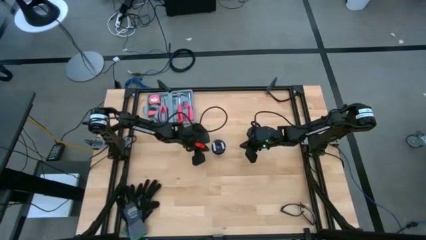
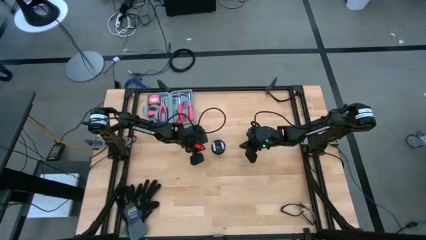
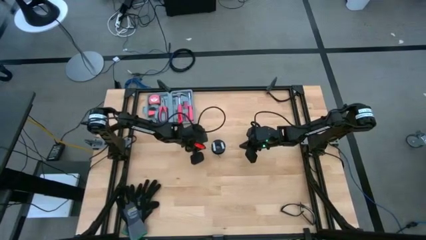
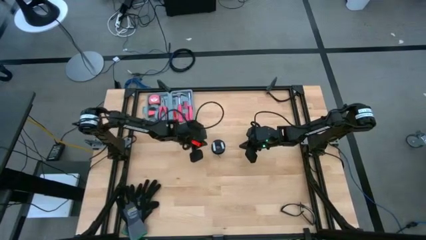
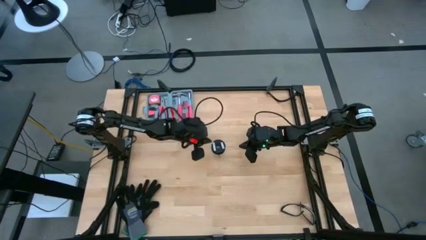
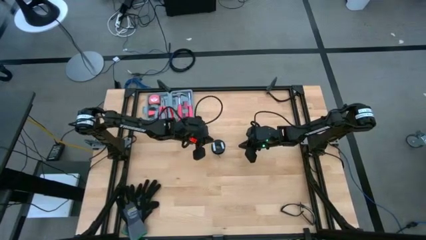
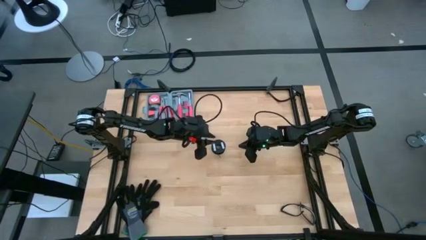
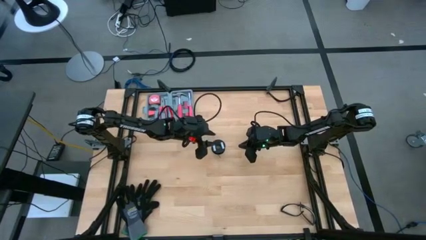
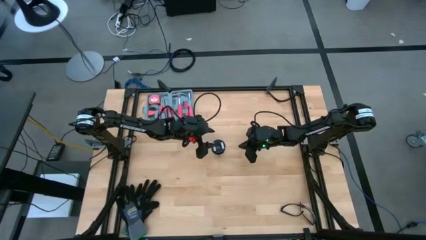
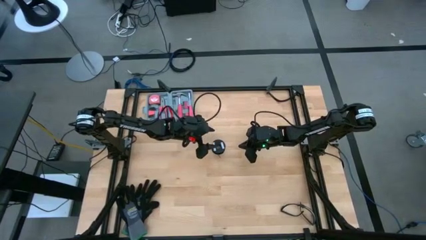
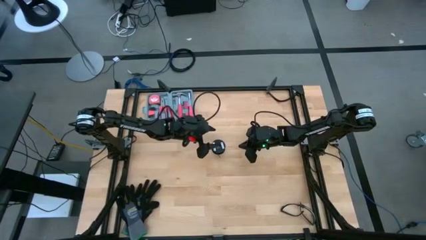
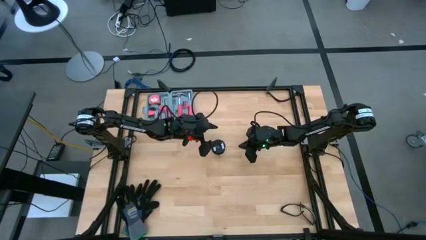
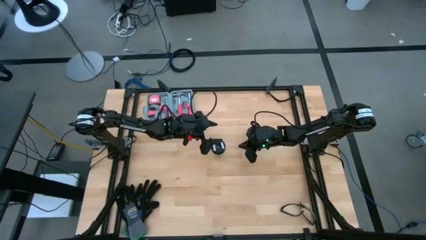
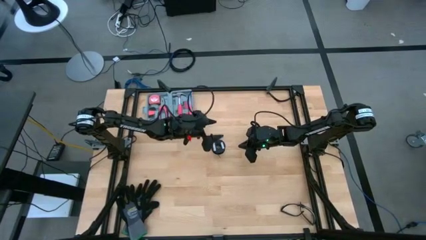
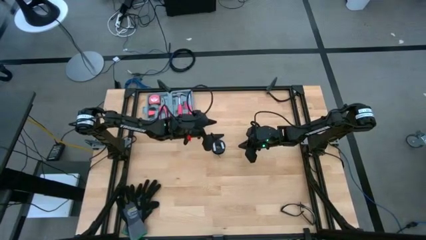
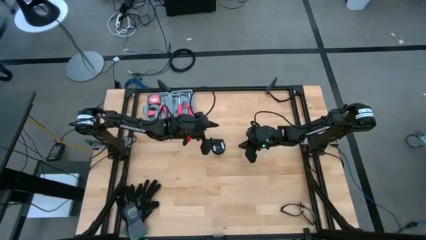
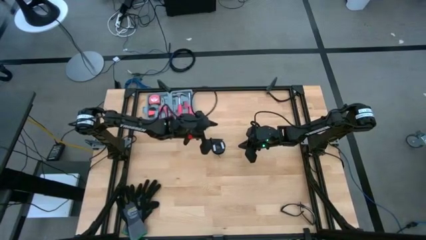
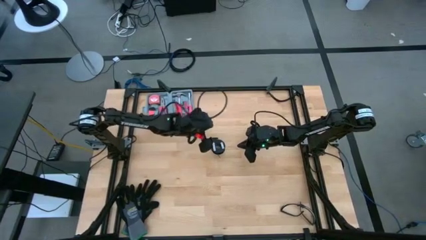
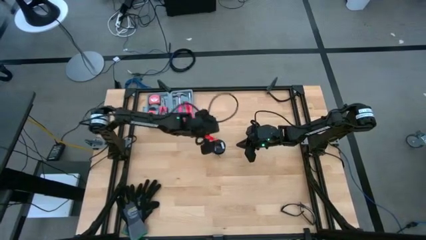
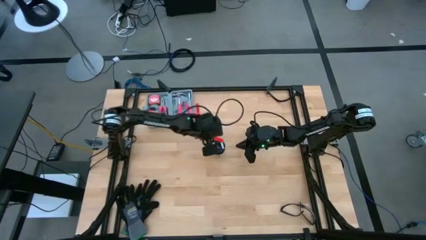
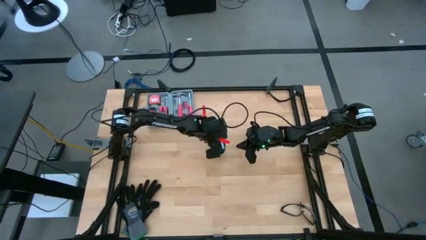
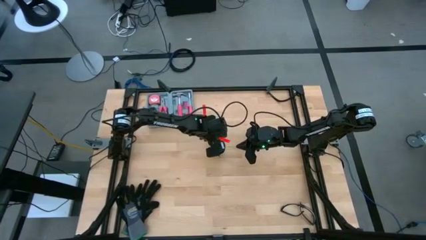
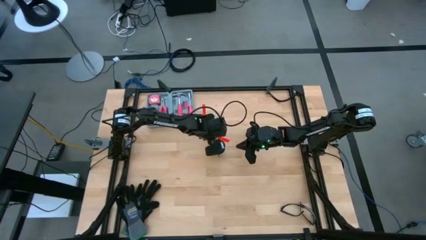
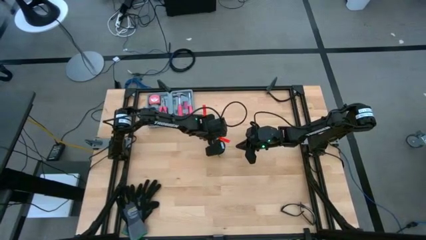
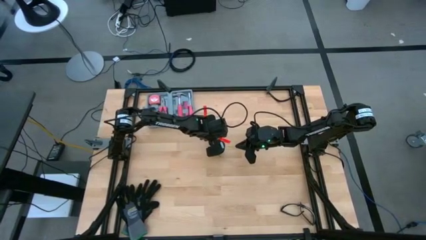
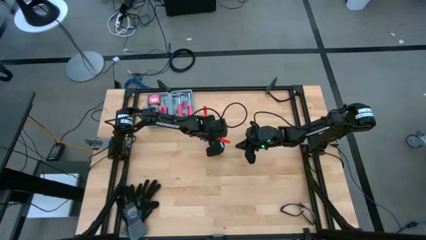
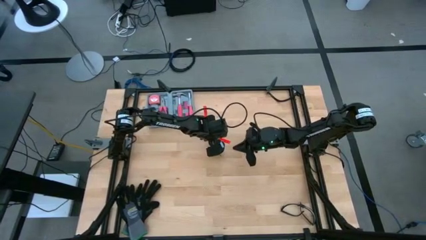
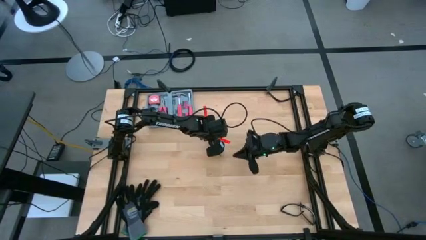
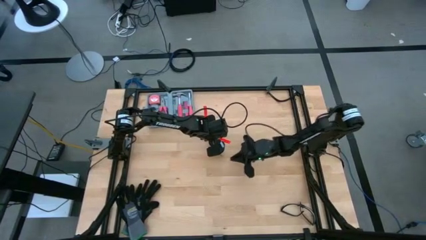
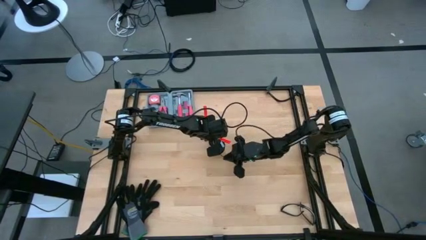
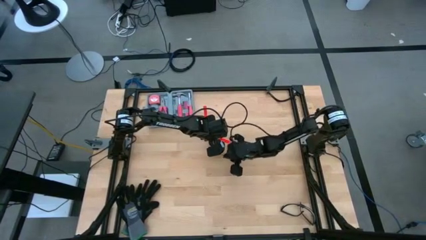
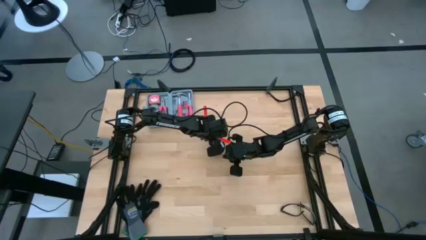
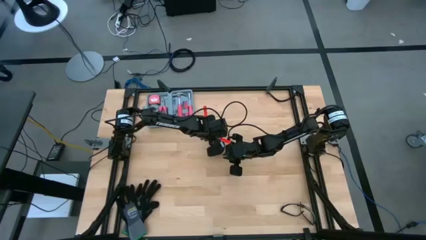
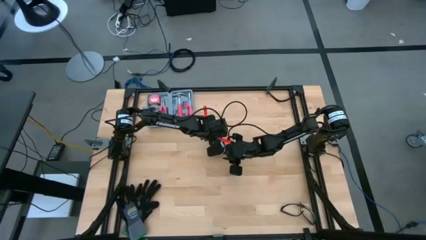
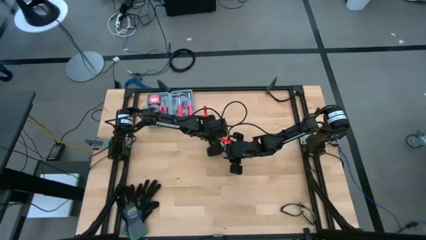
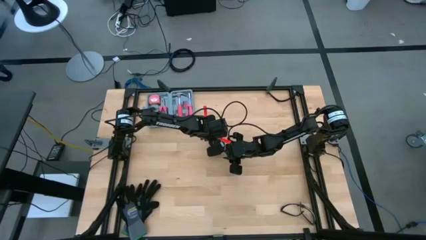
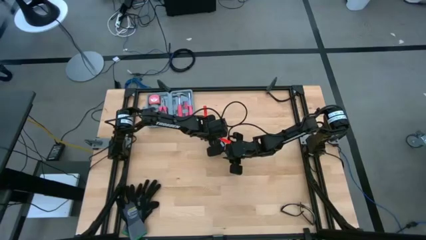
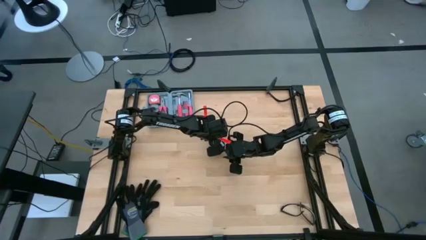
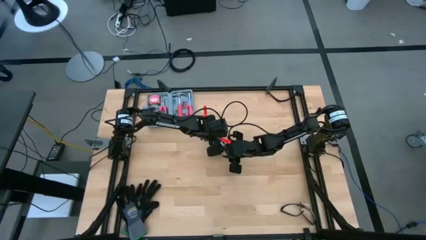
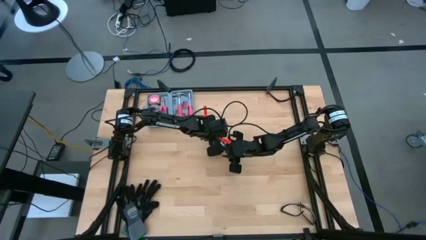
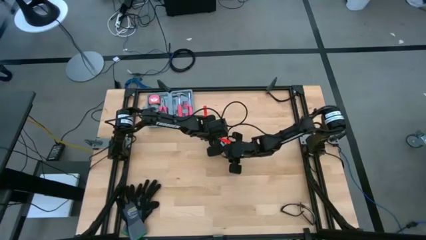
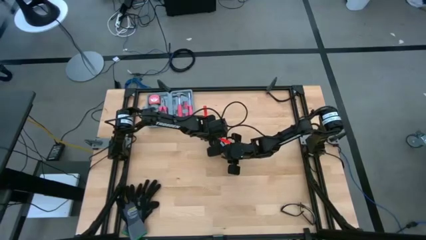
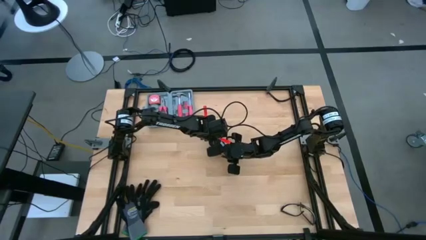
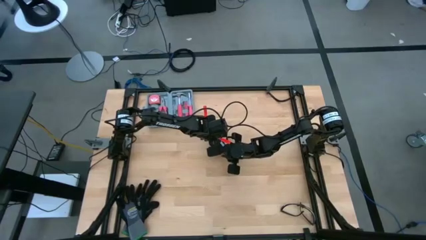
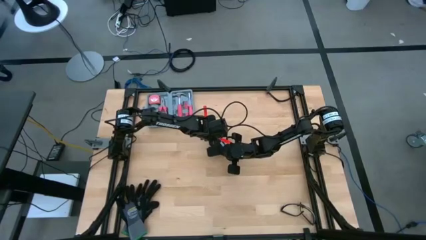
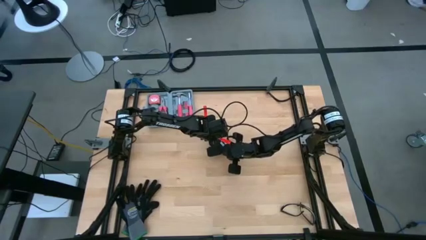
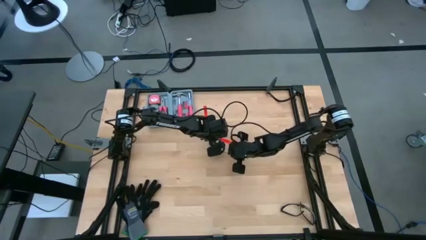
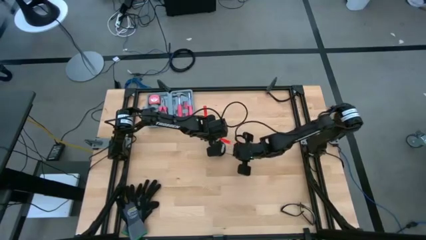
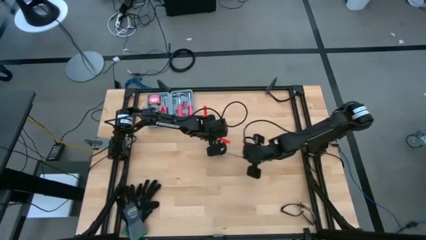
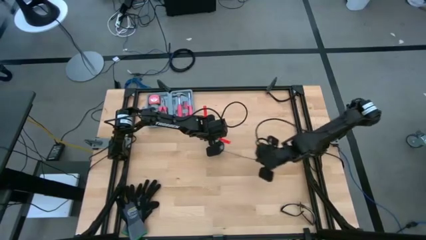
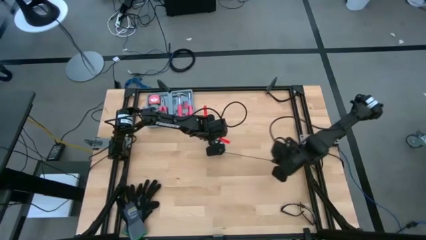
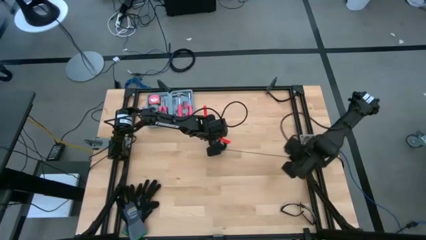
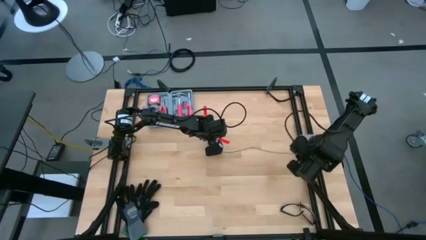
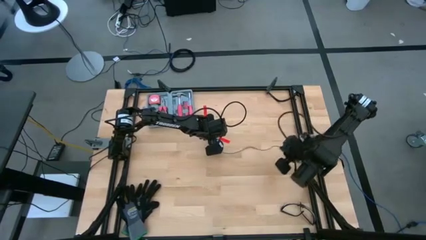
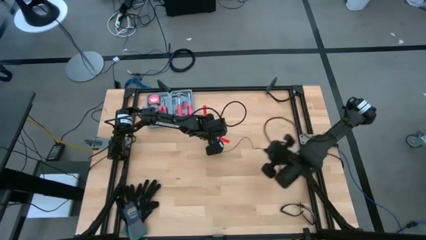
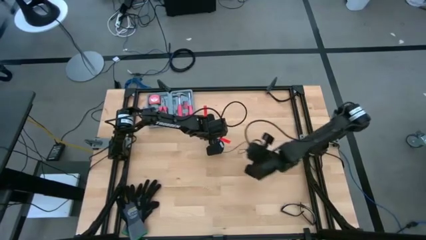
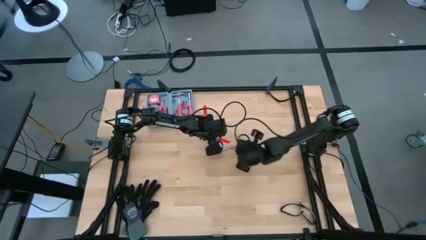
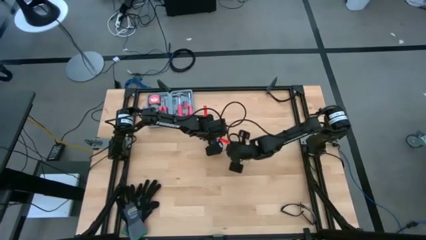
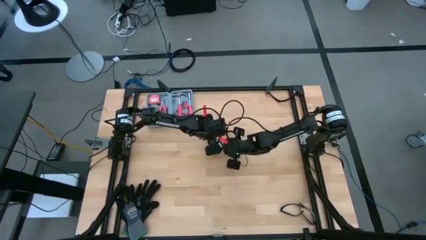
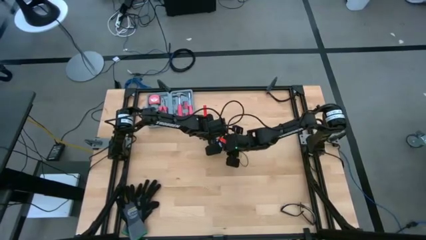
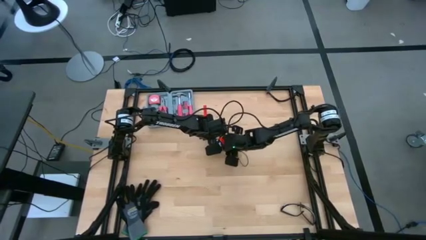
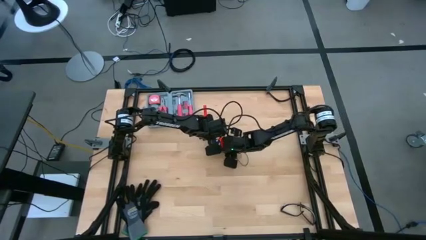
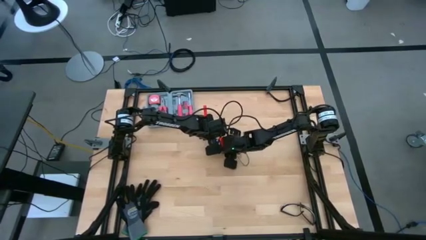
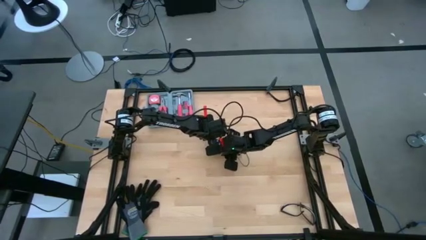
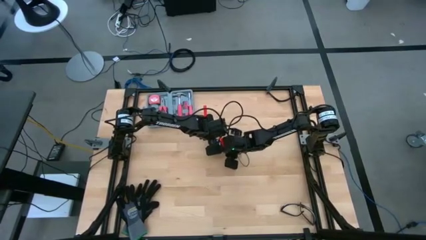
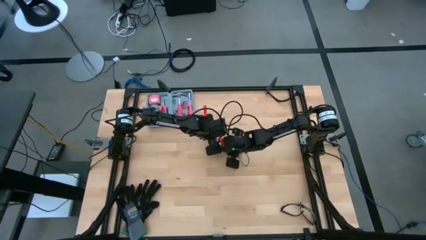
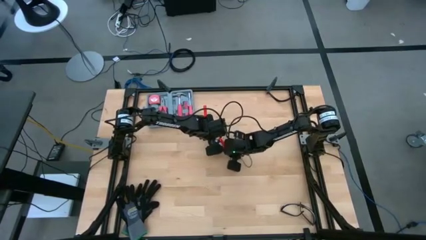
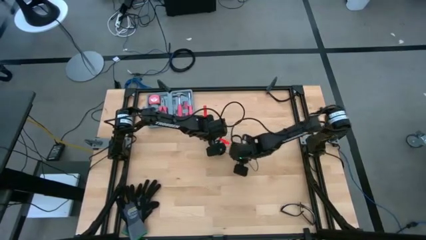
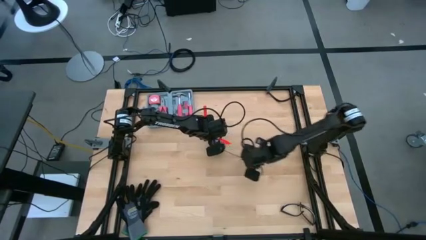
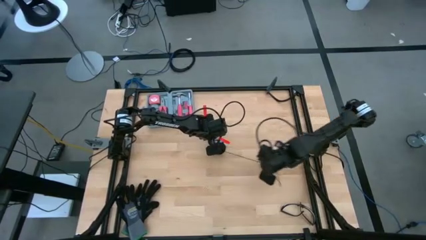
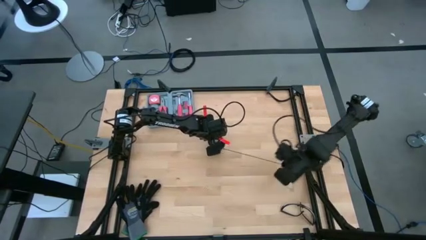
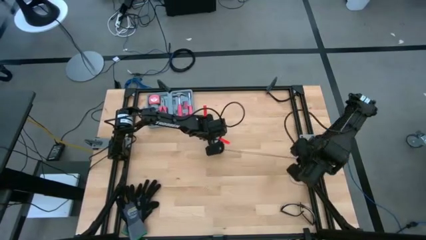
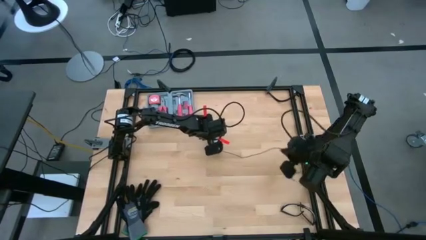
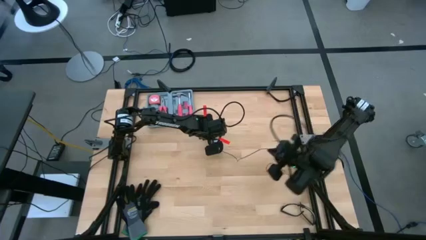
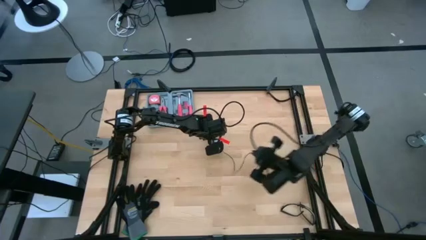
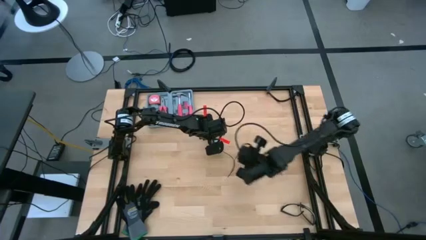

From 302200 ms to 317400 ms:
Task: Coil cords
Uncoil the black wire from the spool
